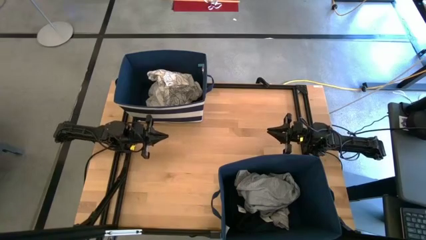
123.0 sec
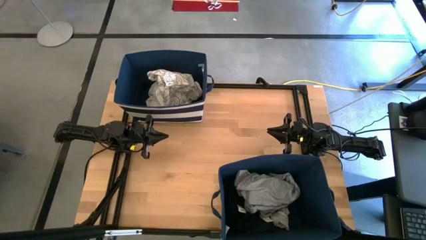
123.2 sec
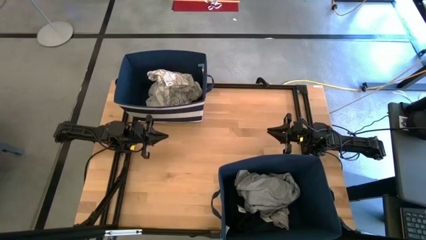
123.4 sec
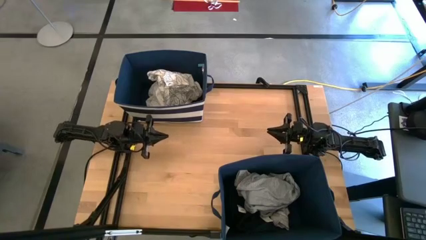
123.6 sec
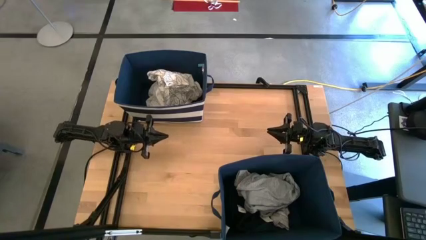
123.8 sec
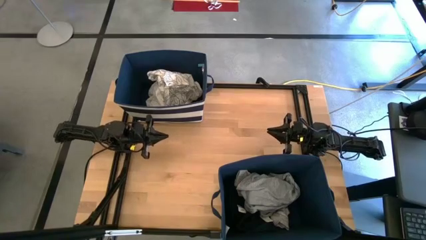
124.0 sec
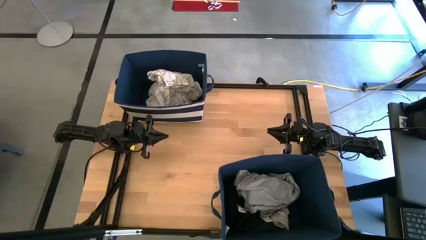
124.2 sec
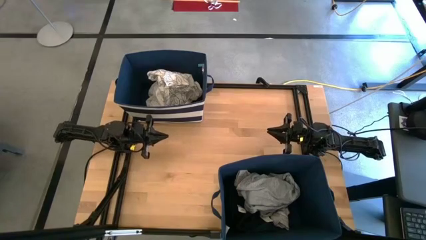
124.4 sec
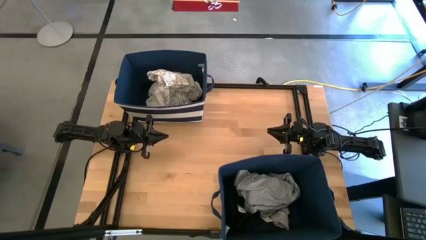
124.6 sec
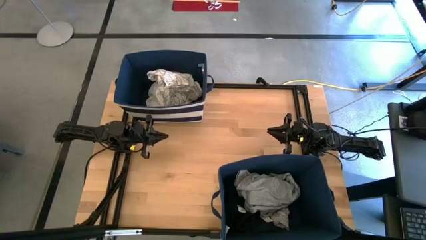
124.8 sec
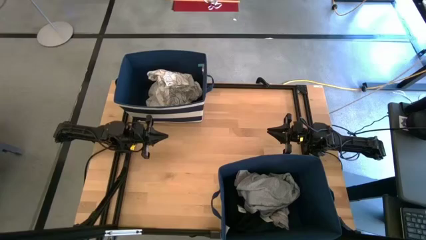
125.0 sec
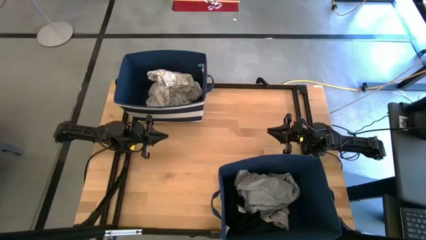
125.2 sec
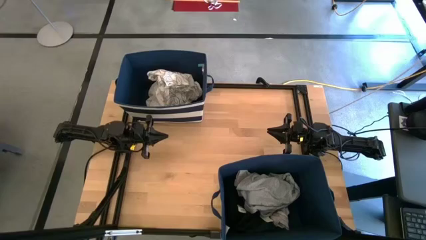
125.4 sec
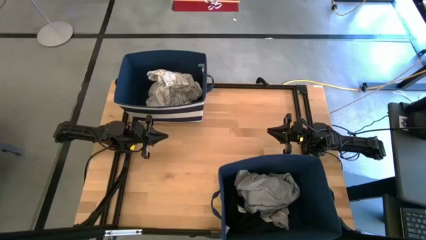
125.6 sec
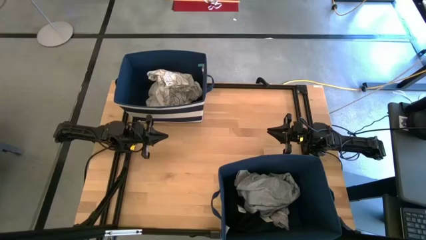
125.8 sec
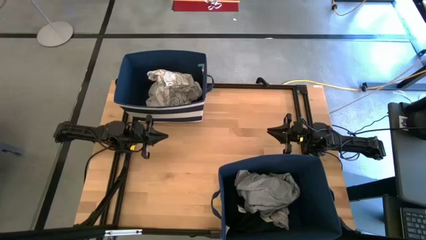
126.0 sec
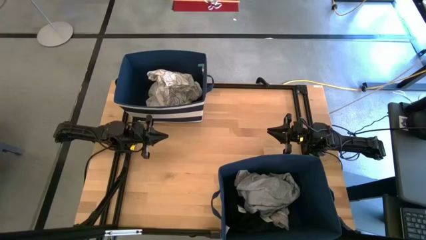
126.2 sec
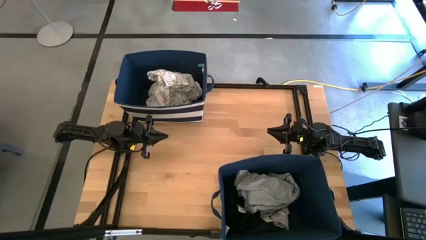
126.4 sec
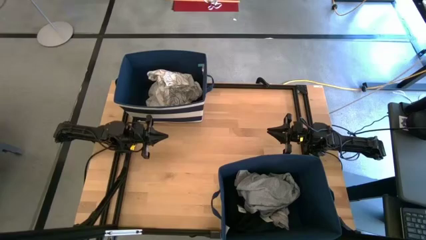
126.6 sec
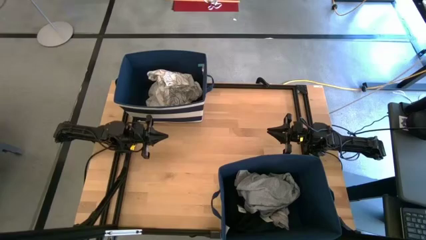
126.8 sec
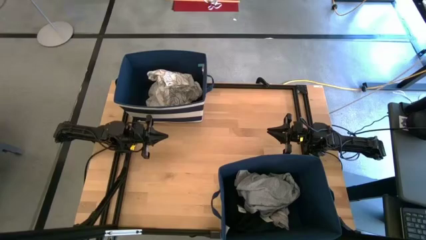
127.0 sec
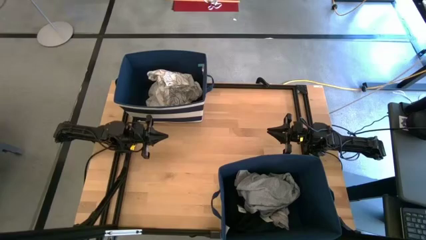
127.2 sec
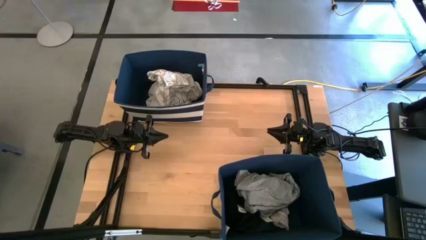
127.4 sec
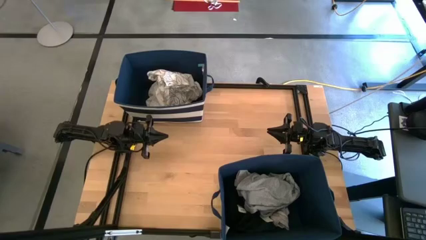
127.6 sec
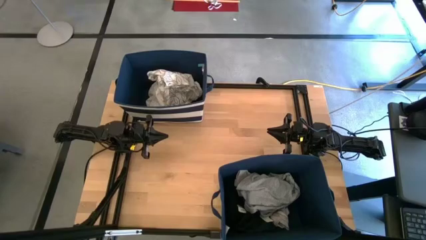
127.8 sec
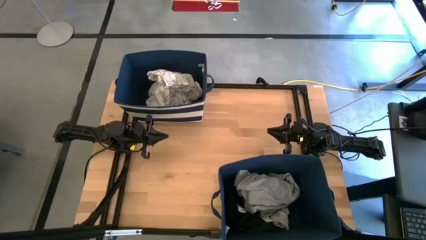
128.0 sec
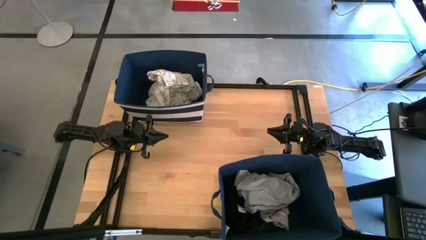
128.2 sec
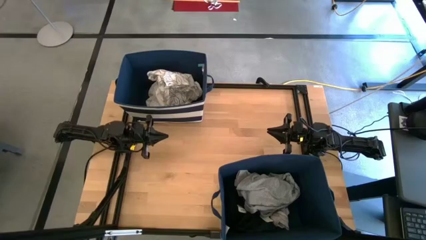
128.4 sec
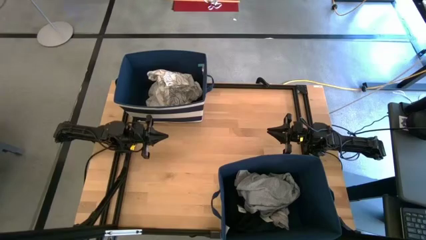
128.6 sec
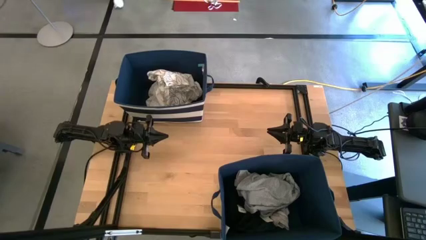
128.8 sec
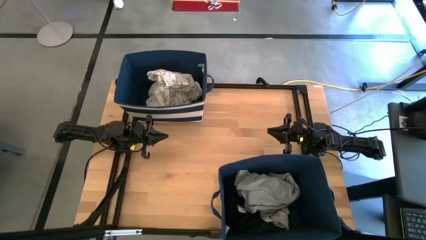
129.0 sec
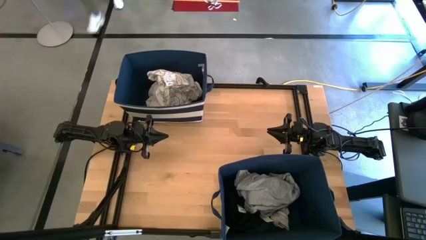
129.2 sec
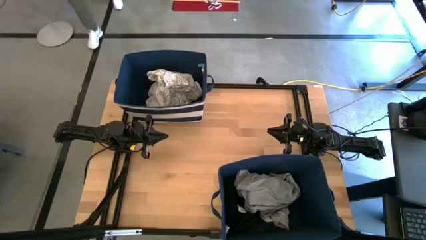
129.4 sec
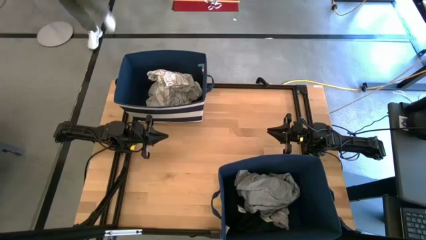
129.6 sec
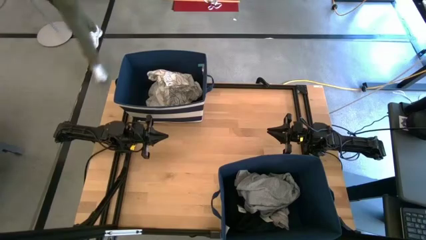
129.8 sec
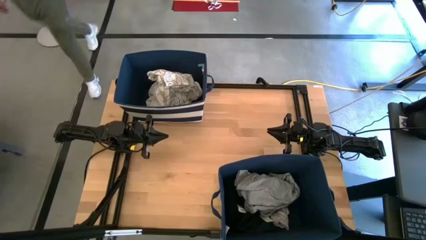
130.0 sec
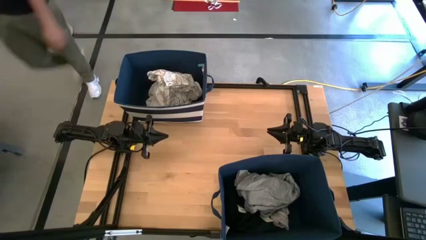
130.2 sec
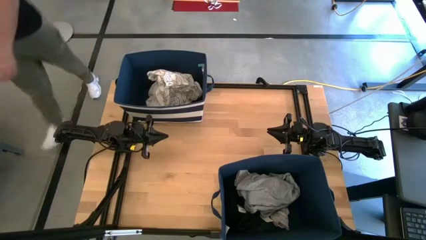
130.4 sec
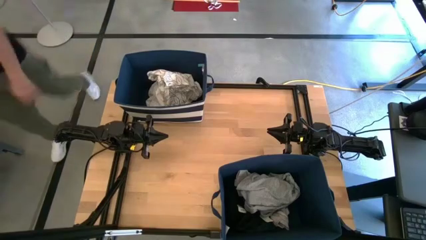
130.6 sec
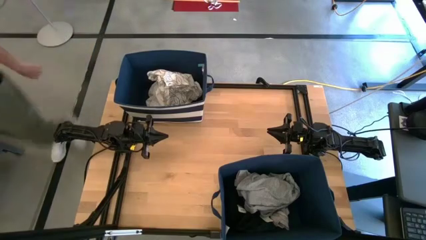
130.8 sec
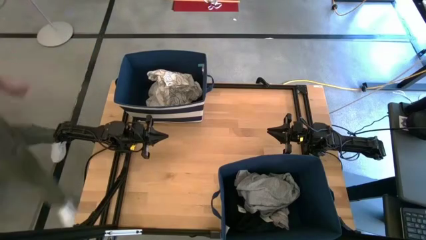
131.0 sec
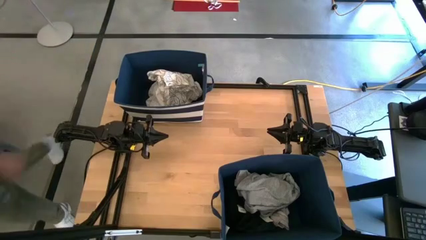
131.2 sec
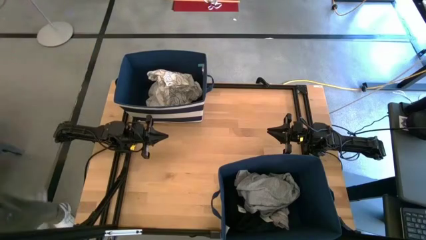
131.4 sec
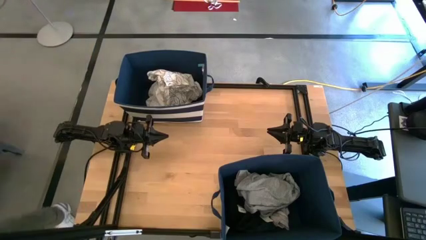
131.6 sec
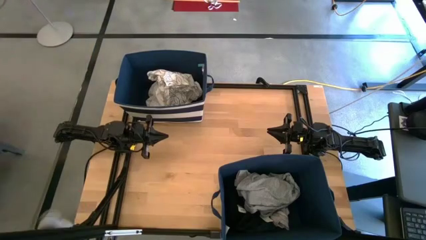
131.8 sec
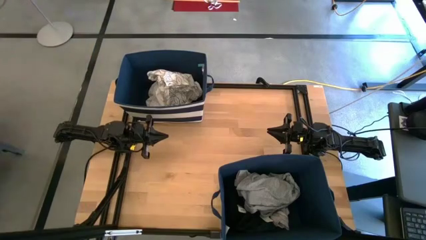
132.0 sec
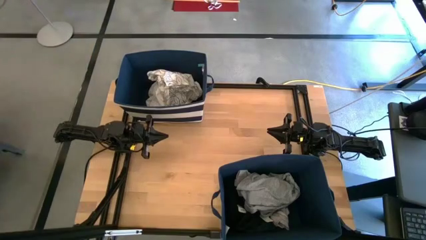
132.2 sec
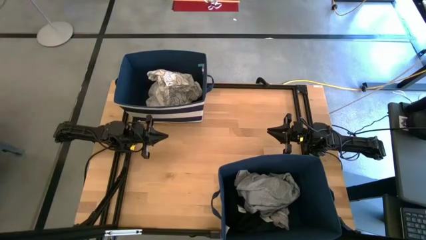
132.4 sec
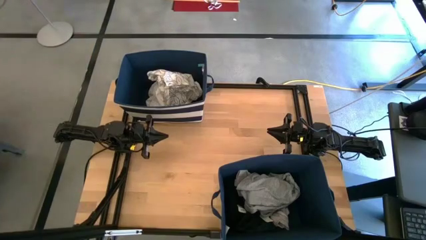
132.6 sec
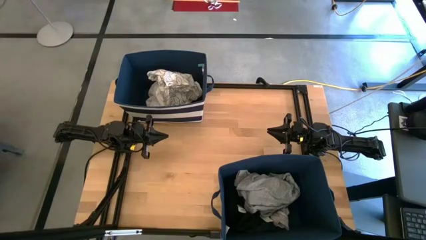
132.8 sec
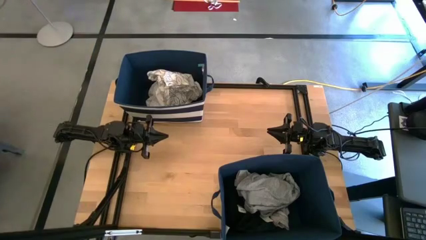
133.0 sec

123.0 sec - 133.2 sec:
Task: Sort clothes
Return to Home Position

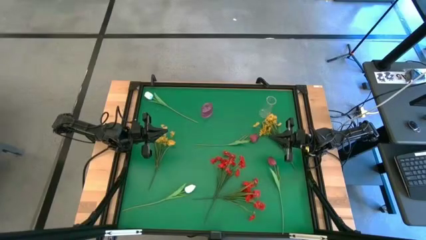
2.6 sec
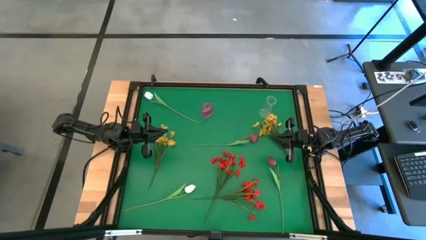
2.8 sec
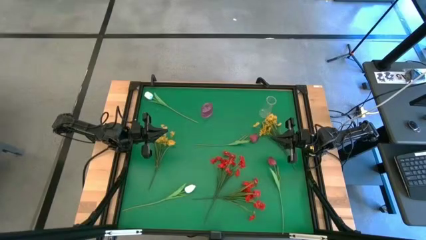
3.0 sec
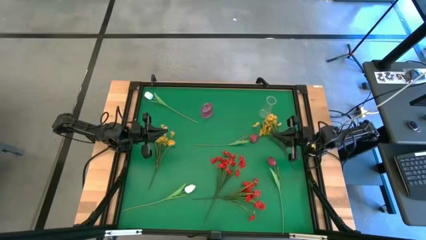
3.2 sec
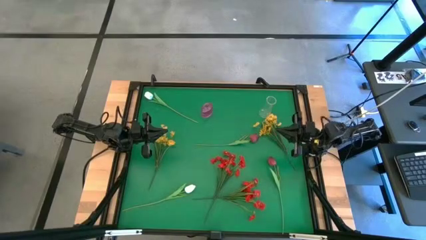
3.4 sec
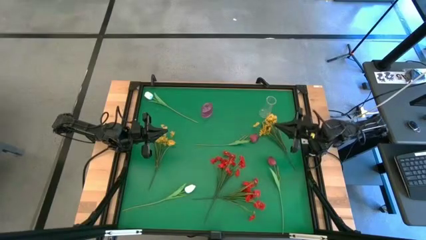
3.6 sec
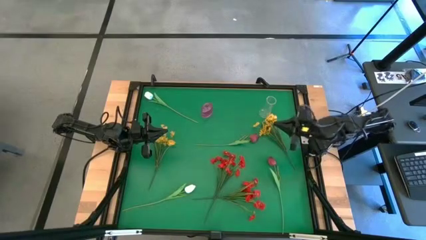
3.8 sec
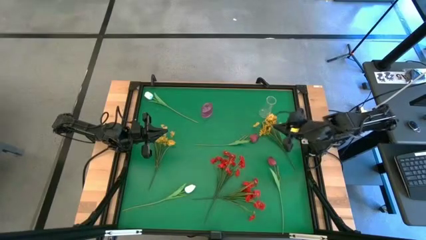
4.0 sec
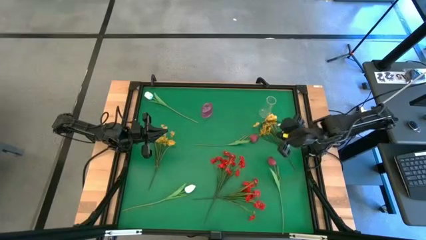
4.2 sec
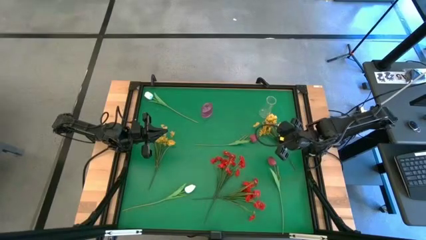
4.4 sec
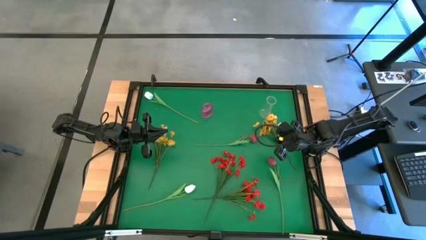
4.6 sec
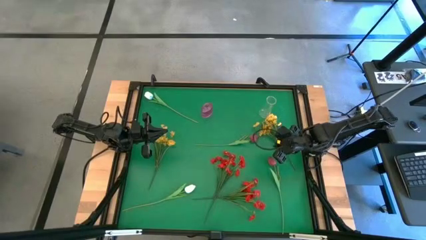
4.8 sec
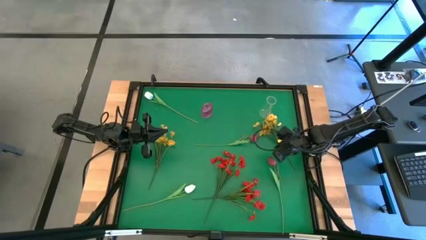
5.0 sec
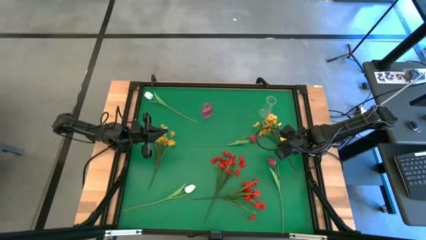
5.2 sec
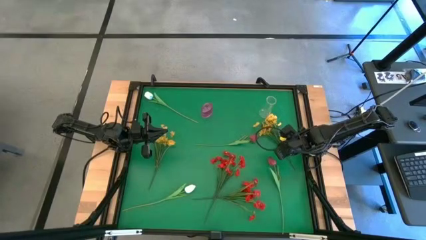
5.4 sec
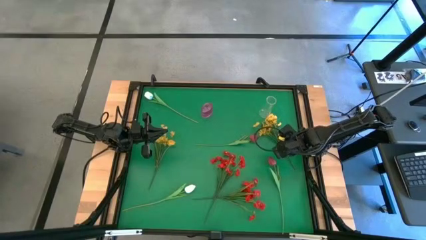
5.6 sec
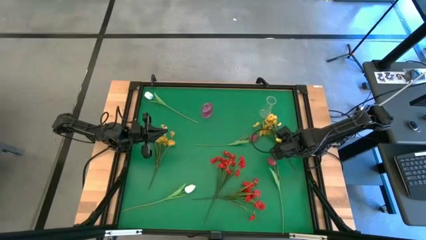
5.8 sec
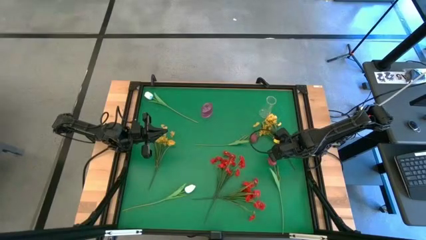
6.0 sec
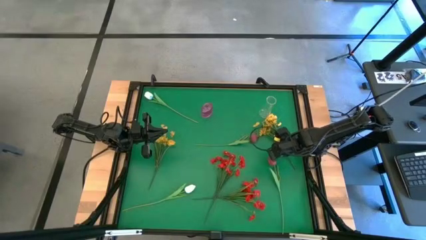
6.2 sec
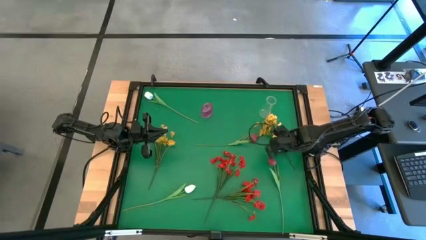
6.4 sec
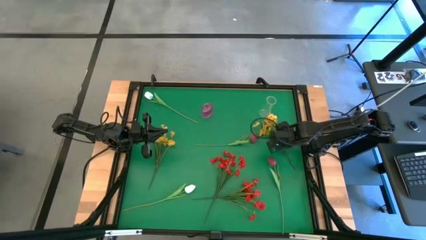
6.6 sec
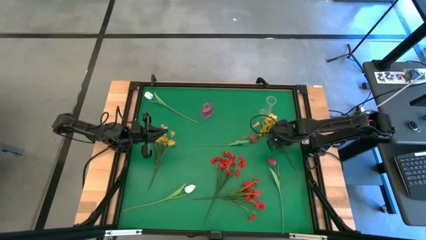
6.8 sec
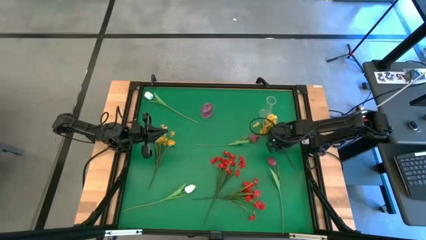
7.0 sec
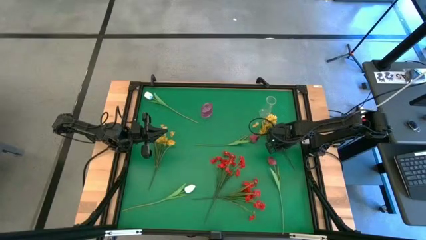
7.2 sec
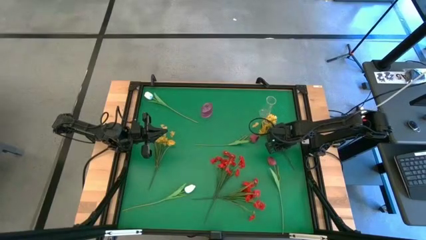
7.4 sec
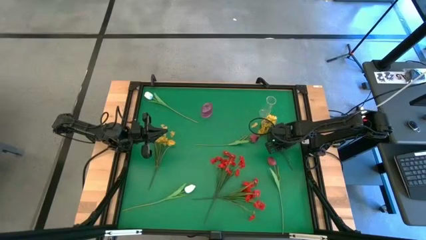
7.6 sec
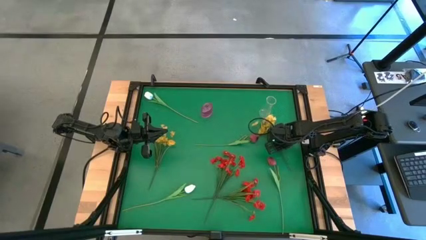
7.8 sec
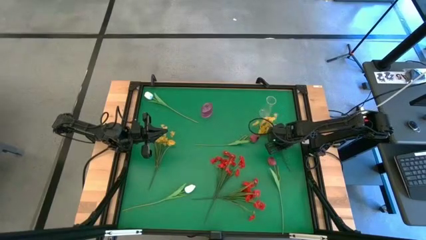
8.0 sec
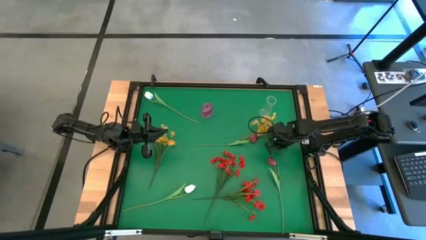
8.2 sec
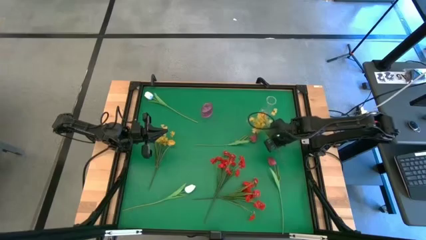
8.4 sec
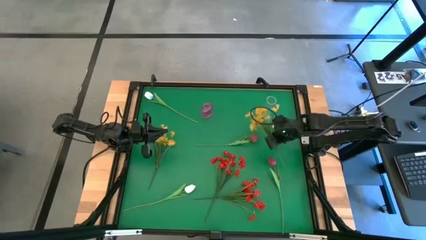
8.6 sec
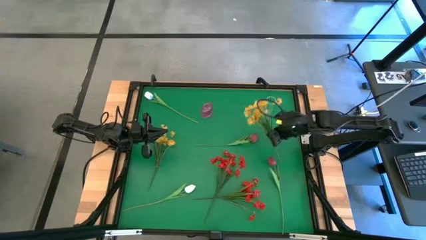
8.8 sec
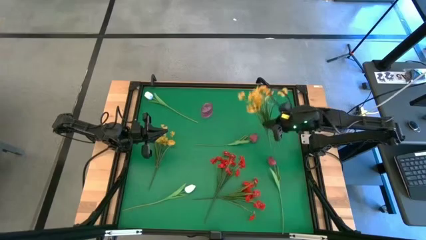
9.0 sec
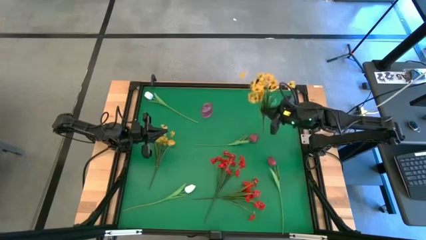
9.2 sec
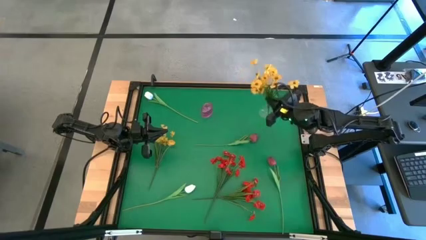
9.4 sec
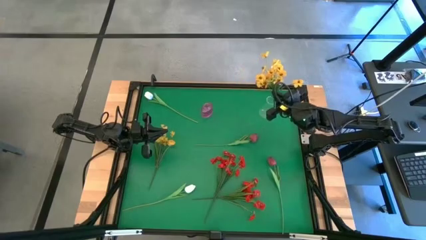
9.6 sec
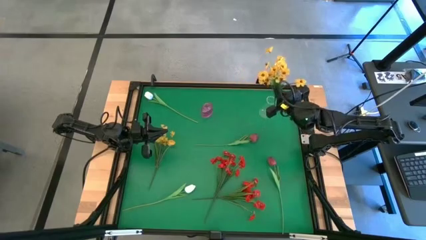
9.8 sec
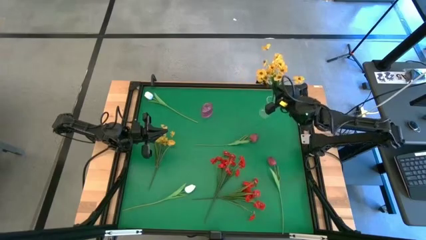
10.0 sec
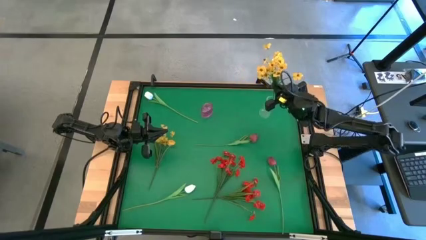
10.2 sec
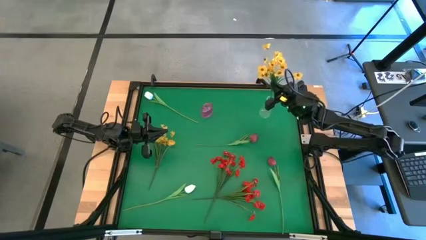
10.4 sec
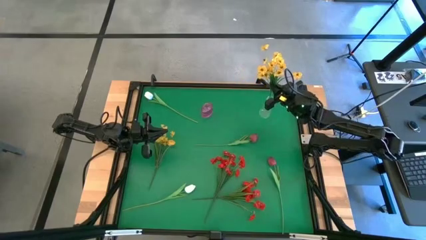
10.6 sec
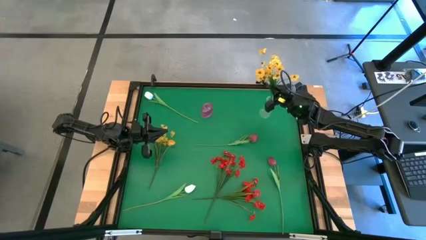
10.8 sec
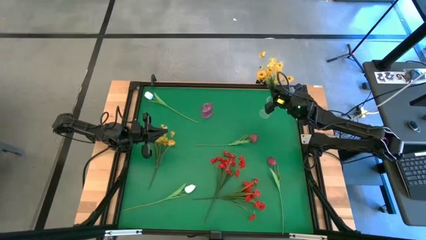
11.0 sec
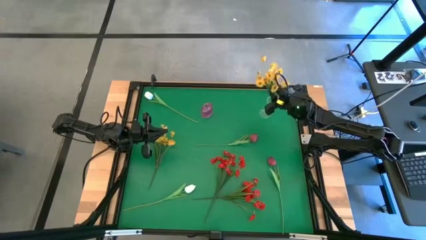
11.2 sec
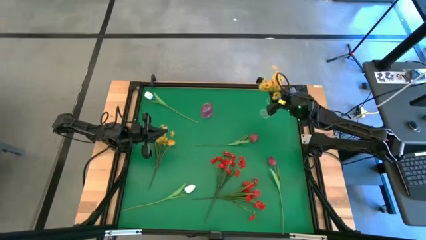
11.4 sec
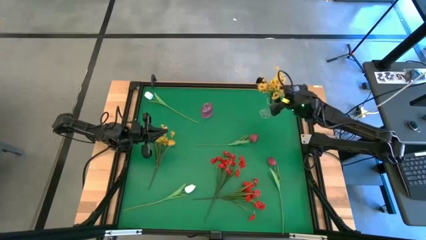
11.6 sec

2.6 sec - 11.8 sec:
Task: Sort flowers into vase by color
Put the right yellow flowers into the transparent vase
